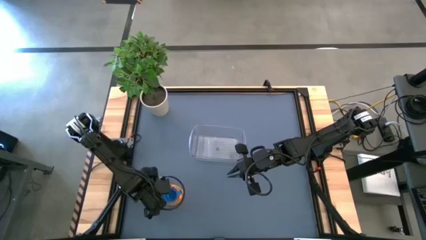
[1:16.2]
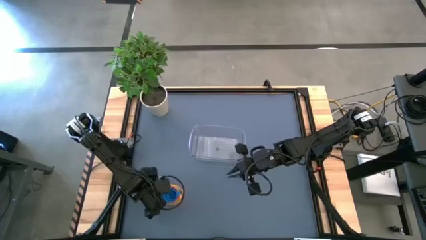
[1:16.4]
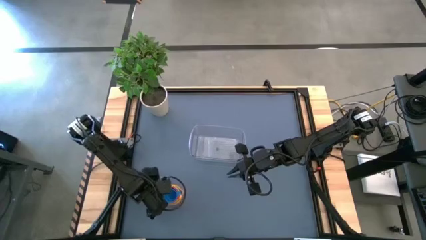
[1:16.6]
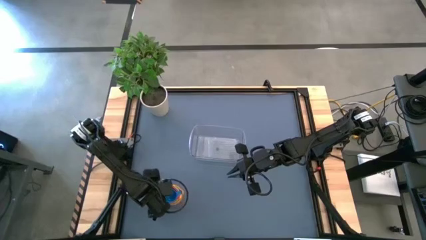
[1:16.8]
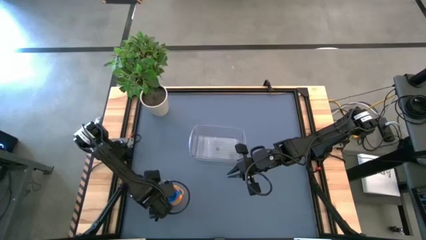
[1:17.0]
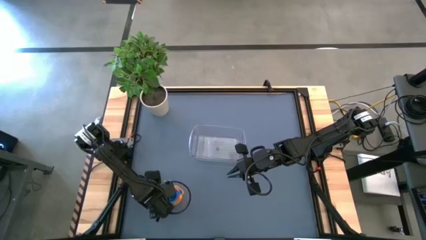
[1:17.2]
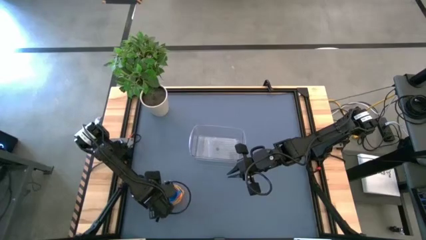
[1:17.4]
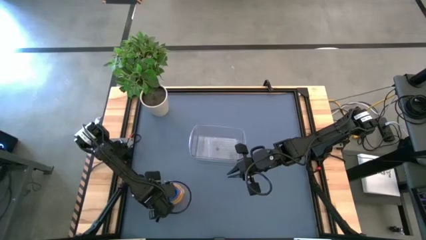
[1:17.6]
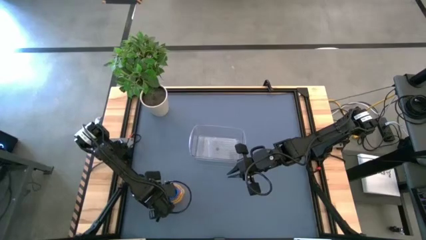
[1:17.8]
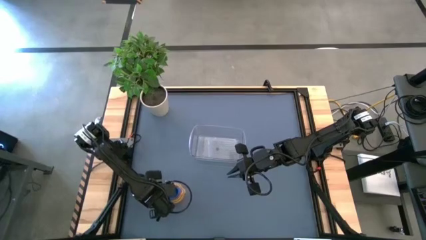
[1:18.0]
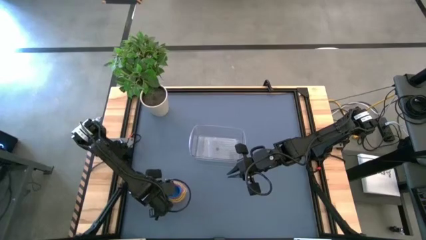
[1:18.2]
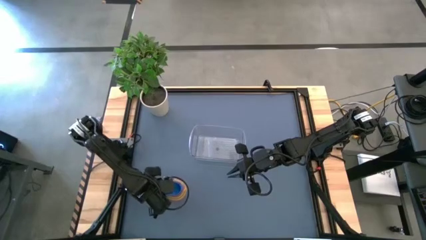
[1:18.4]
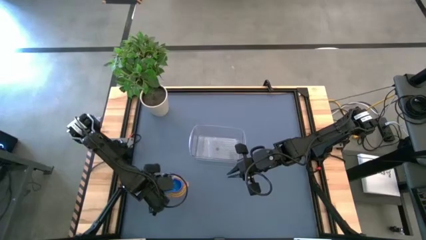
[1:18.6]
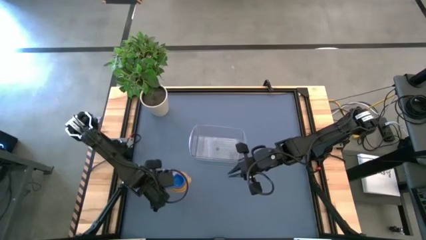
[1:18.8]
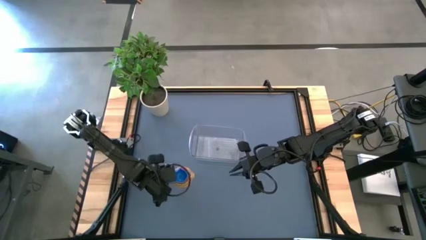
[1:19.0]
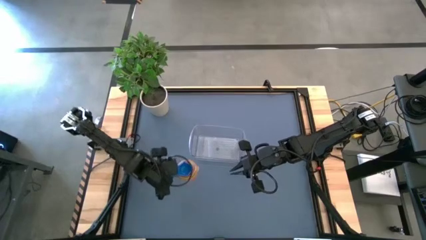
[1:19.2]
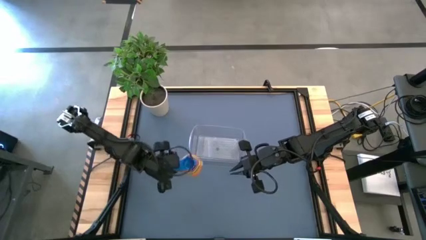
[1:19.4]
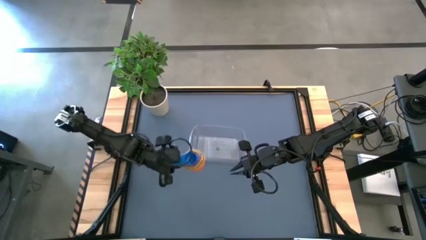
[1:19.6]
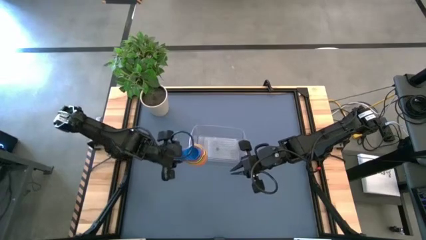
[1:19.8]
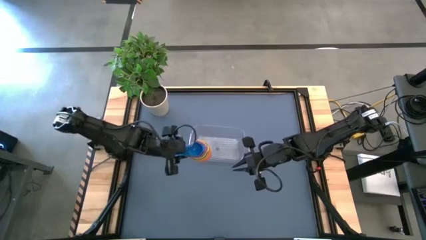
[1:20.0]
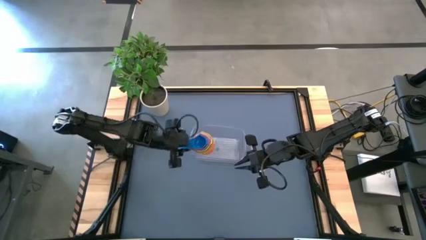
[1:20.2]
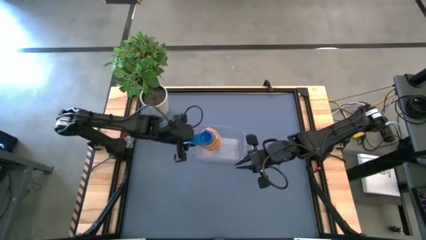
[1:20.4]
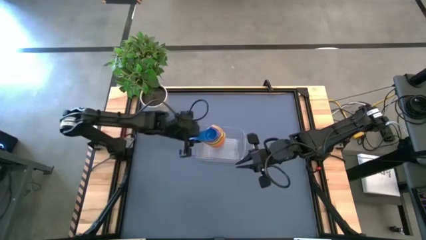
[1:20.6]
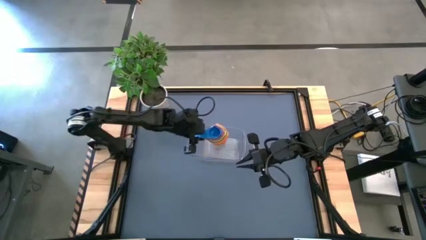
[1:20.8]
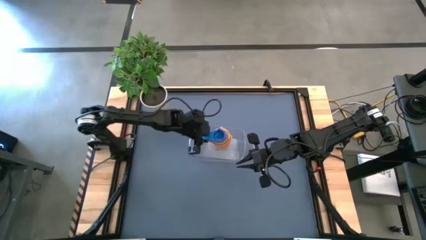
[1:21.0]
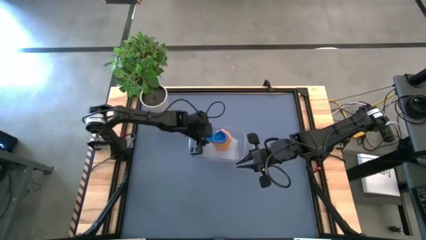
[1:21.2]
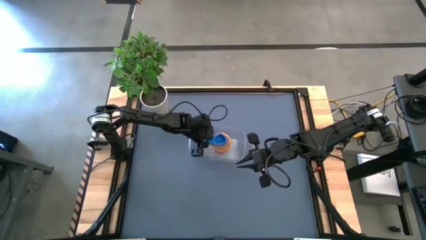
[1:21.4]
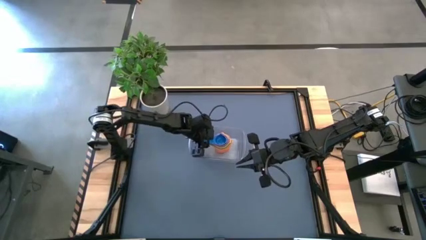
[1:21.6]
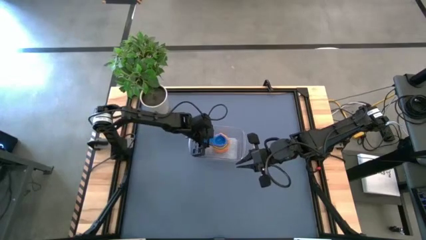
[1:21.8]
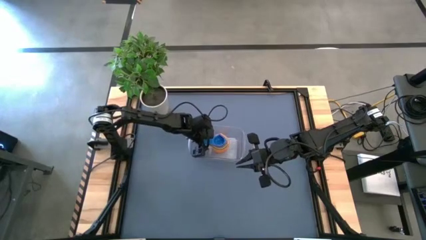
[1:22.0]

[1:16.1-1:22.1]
Task: Nest measuring cups in basket
Put the nested measuring cups into the transparent bin

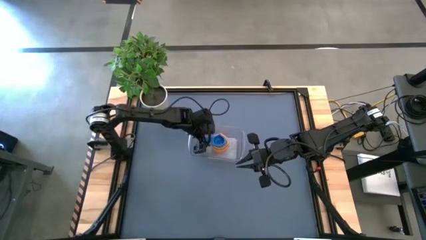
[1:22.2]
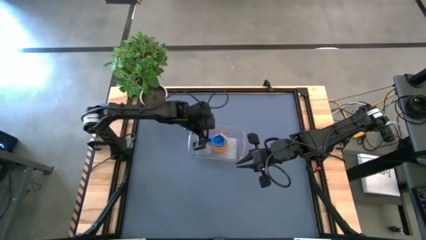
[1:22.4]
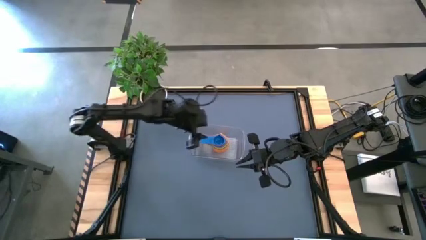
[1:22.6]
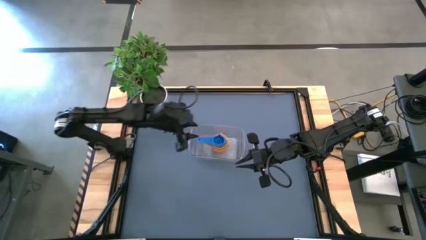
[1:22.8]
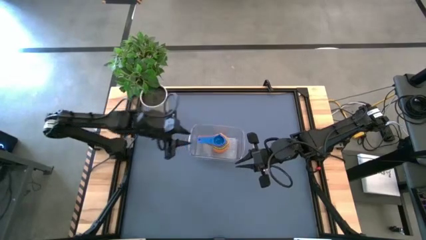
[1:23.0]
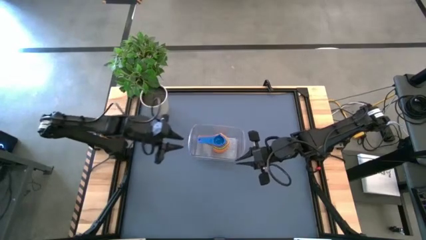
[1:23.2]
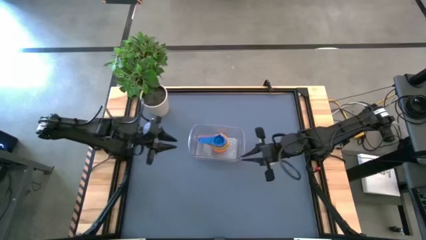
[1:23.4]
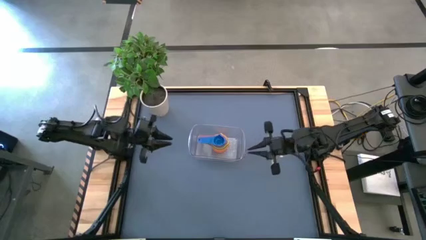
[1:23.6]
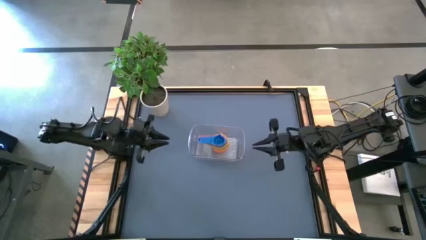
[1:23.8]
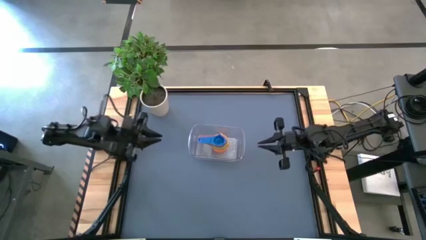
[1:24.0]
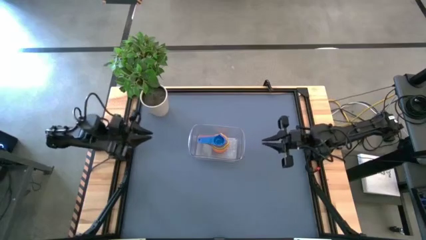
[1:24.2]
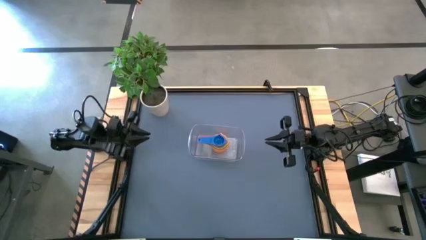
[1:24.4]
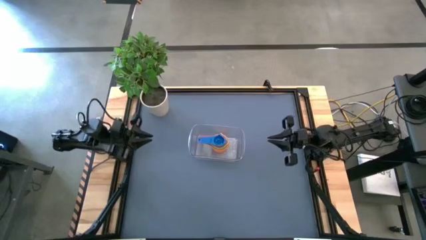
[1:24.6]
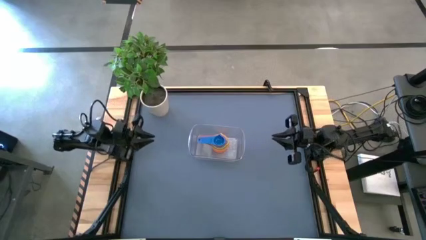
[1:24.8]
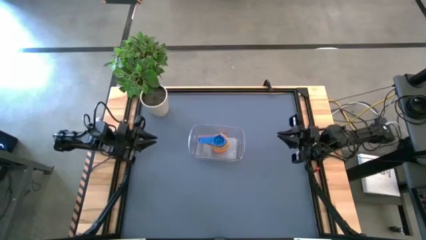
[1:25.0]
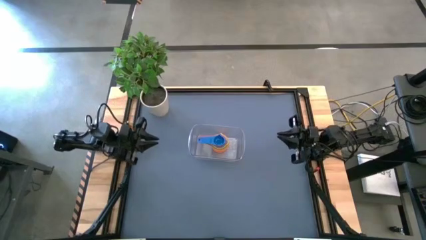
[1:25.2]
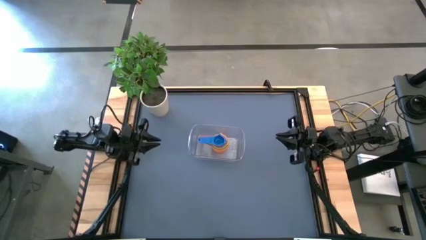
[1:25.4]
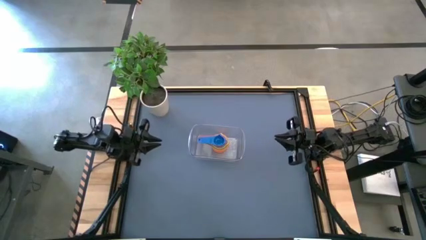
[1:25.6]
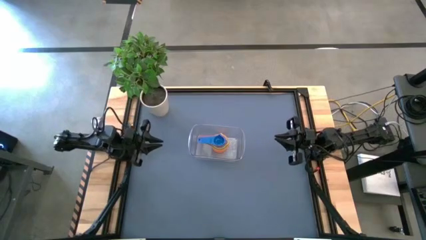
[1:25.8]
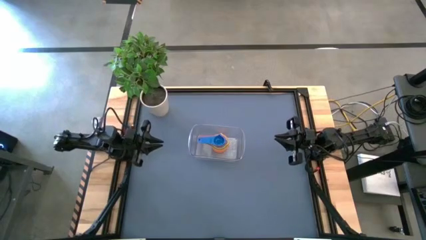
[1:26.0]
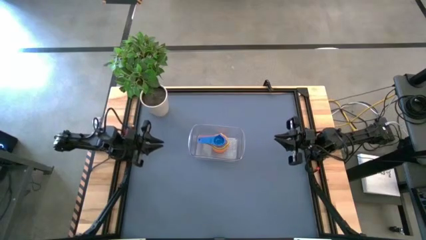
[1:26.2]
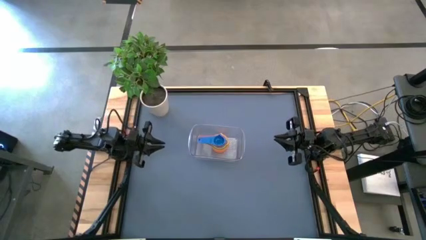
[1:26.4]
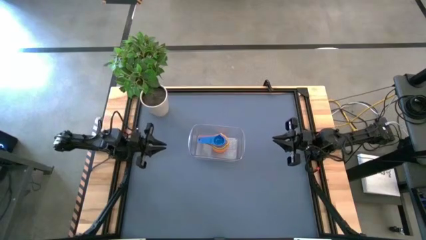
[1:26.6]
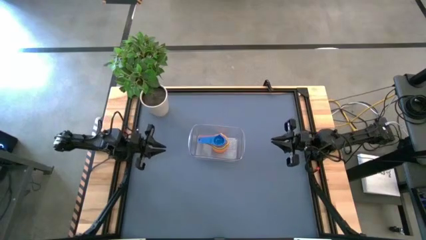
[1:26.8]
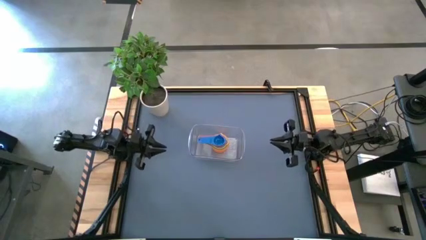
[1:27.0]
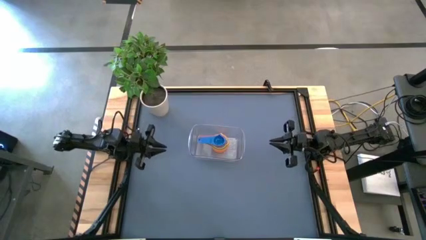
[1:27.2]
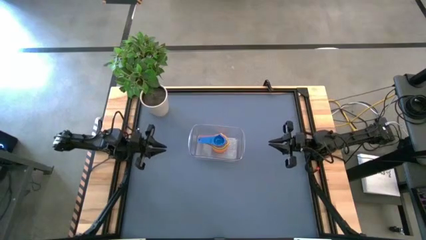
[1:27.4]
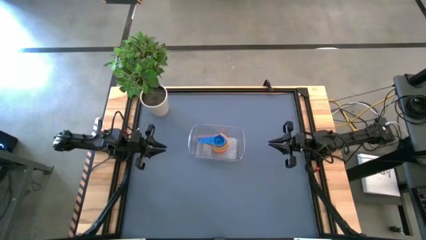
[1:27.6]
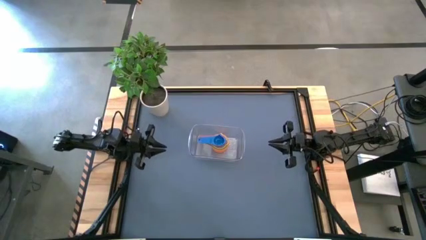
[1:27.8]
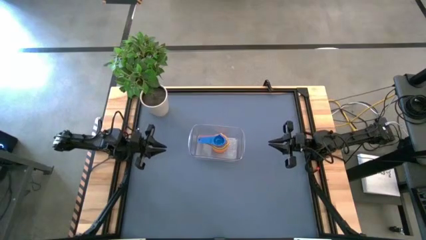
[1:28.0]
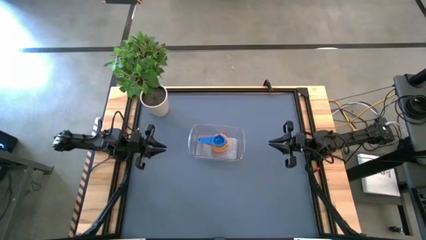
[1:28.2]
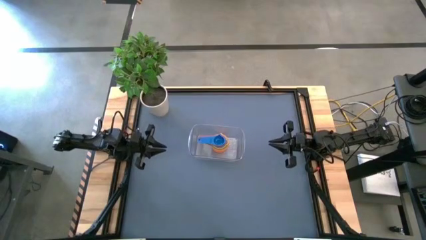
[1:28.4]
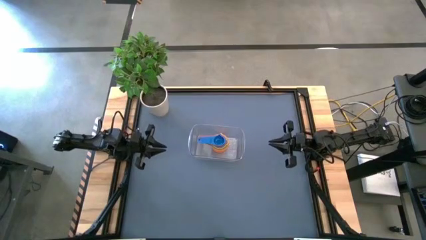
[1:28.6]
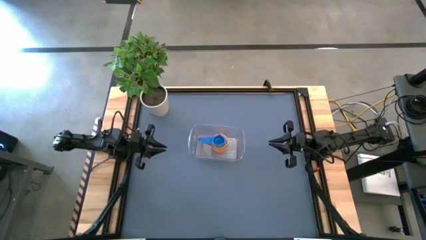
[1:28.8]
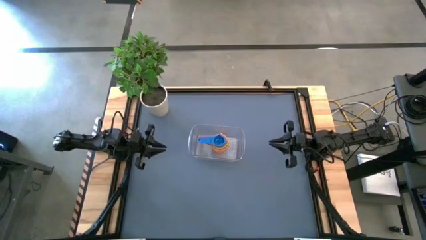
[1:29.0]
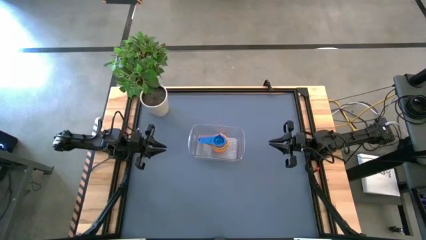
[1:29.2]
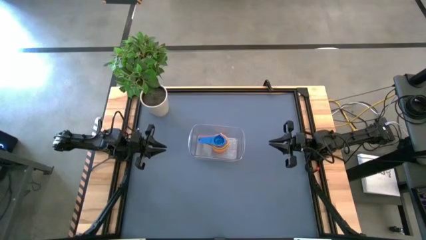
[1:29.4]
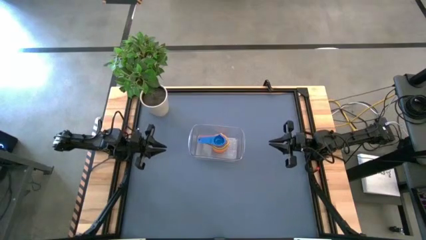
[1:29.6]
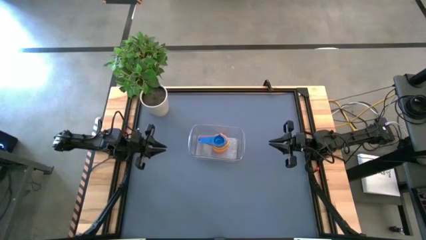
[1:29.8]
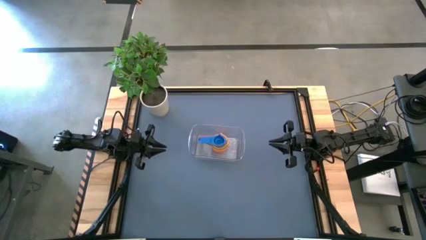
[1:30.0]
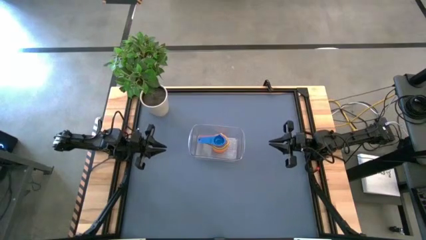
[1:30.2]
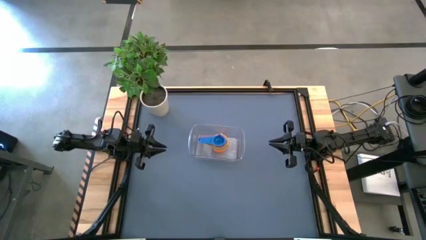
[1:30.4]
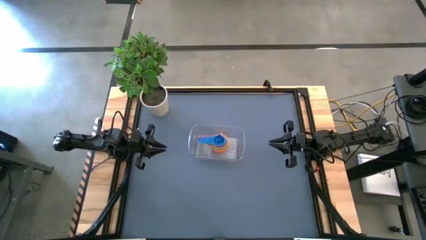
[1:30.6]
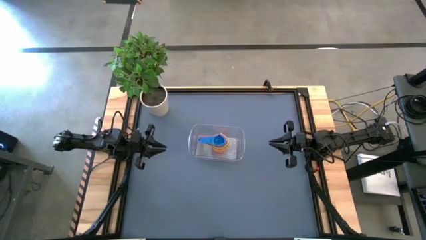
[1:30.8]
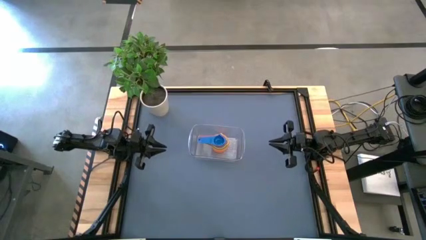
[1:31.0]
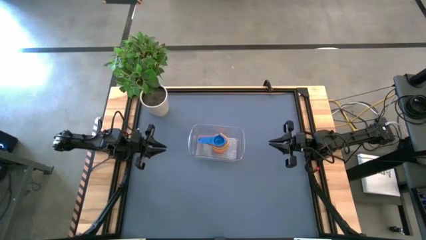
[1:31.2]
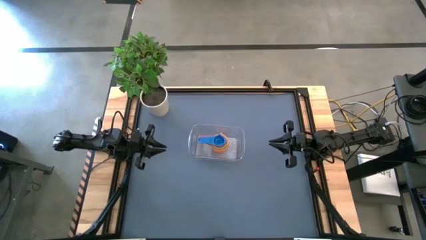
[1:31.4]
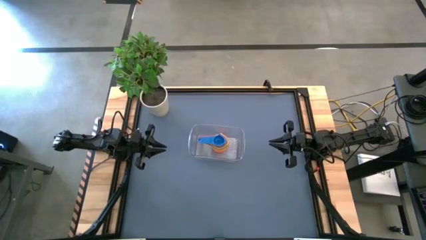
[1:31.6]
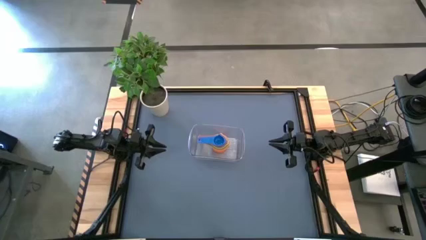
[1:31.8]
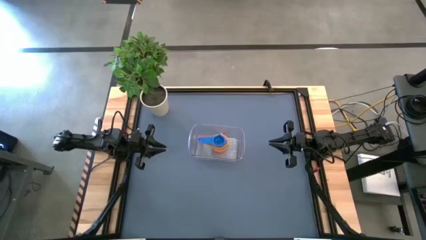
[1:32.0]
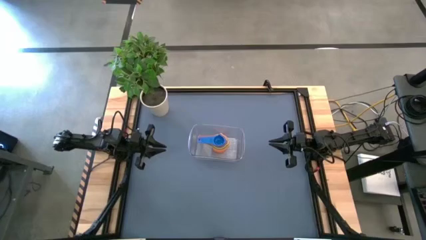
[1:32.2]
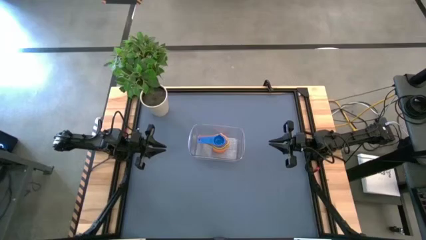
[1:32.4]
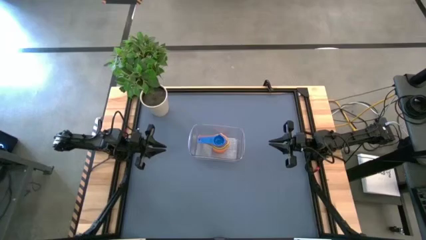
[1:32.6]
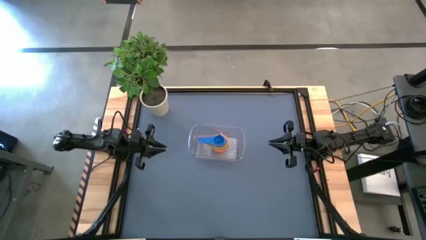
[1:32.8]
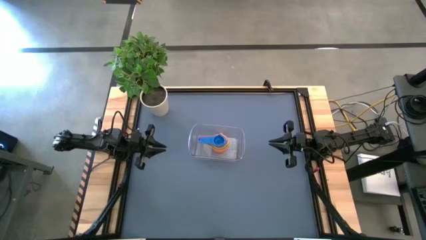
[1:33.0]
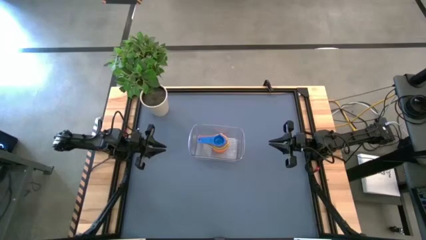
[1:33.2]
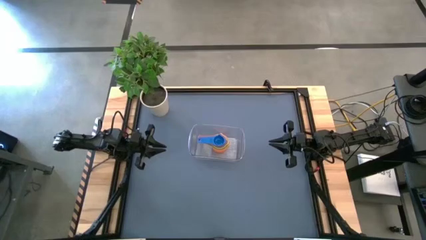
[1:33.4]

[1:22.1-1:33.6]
Return to Home Position
